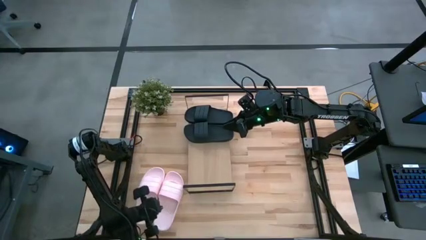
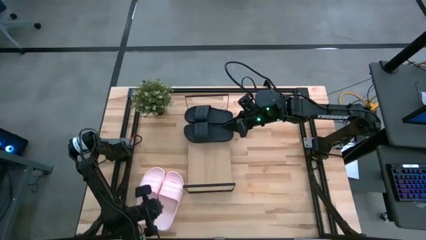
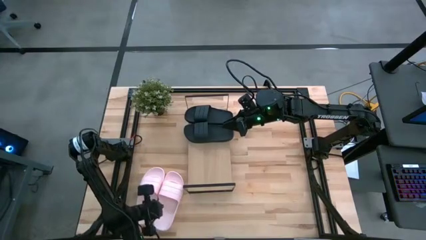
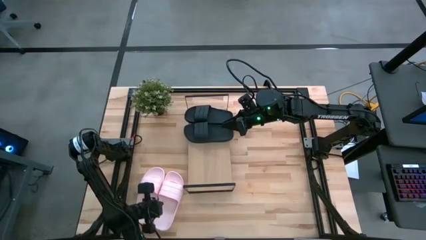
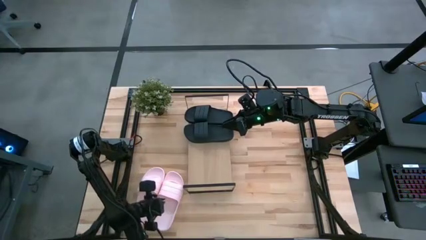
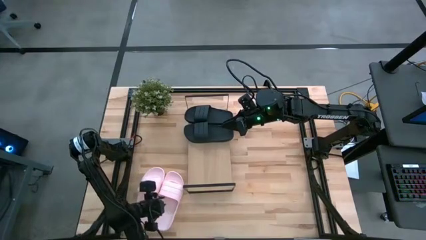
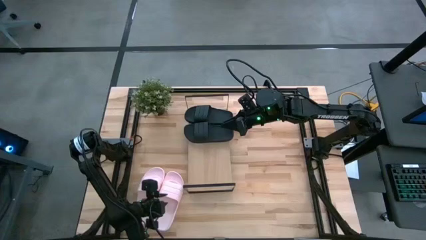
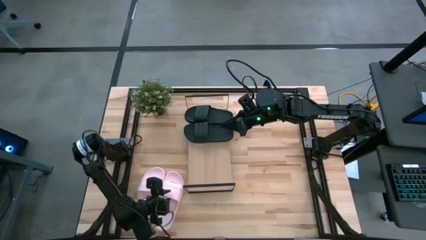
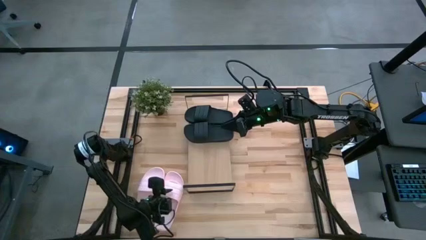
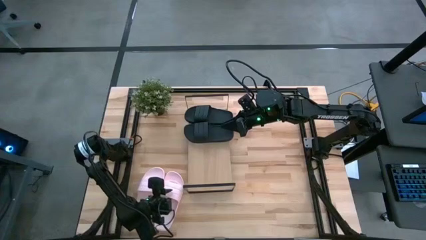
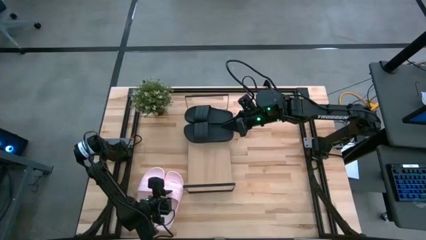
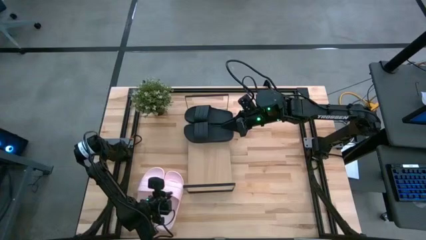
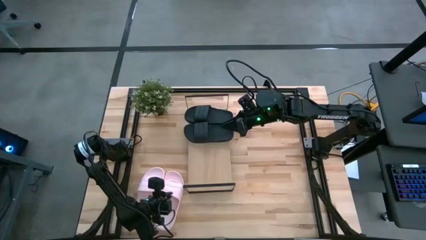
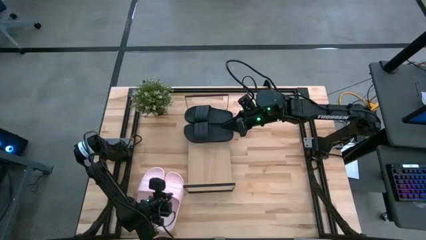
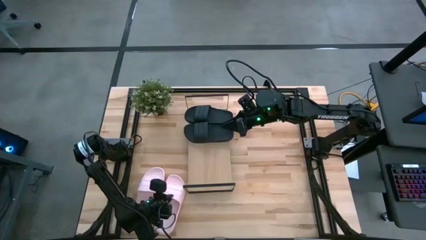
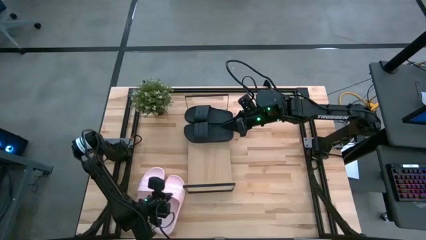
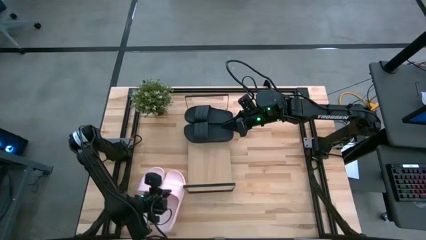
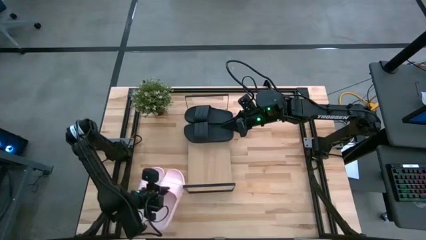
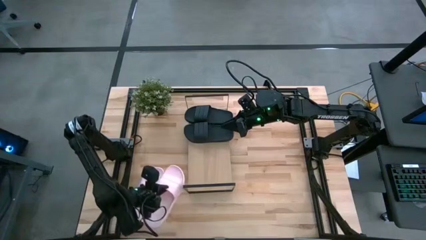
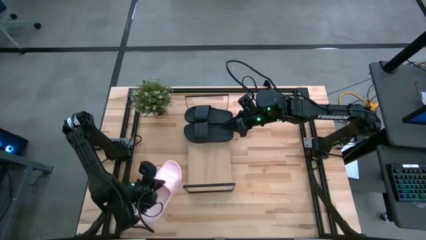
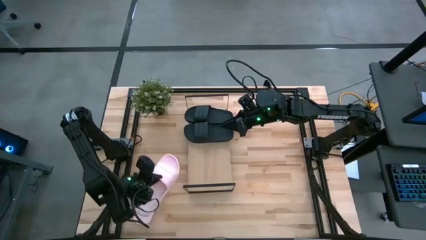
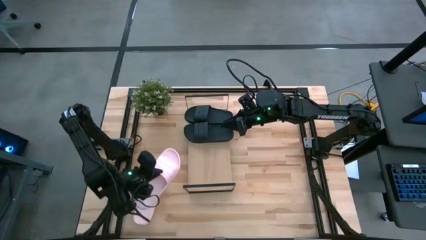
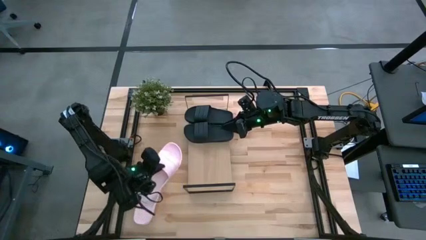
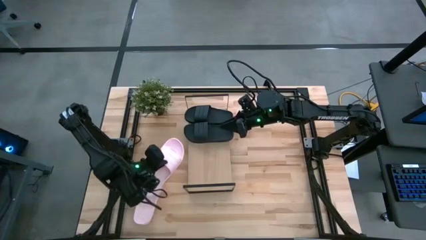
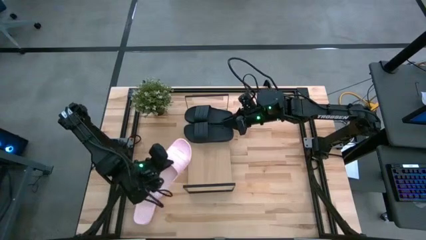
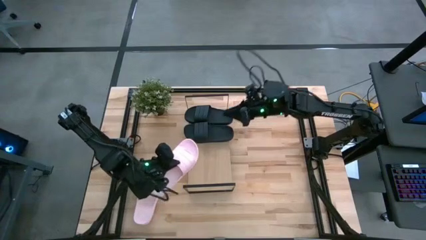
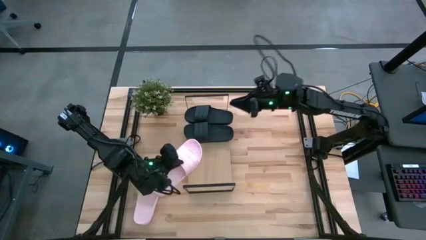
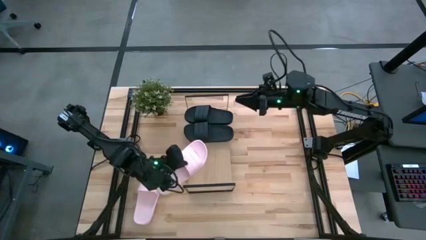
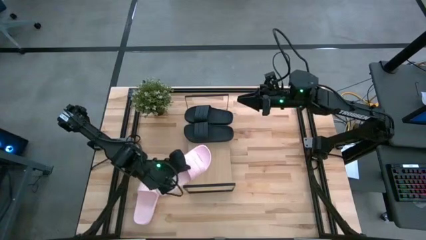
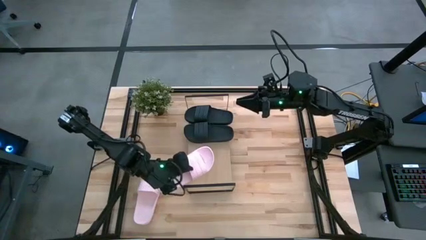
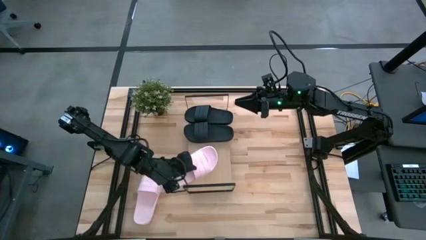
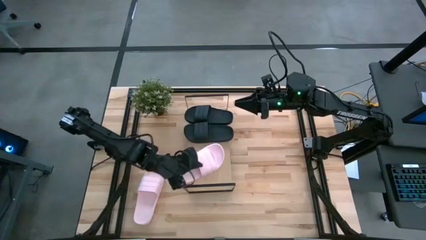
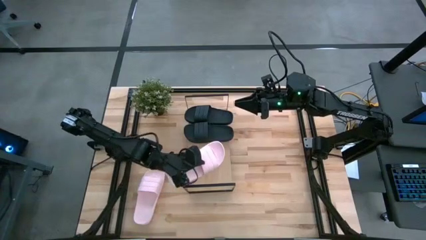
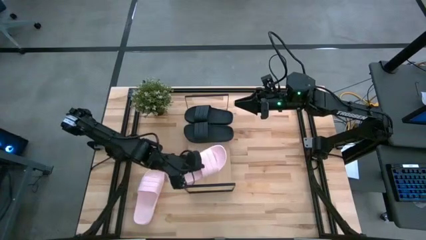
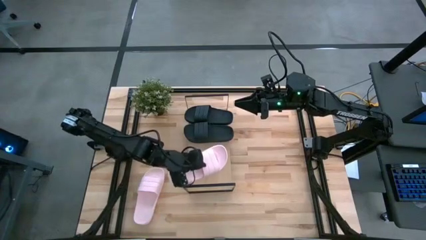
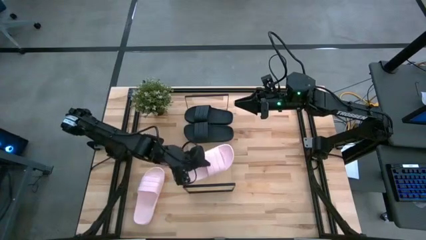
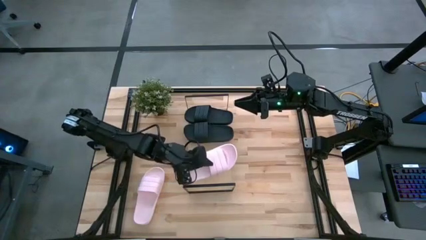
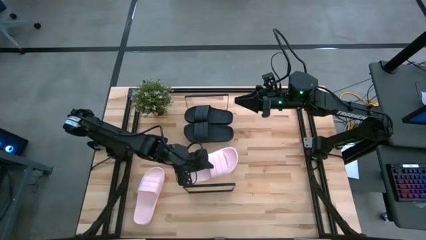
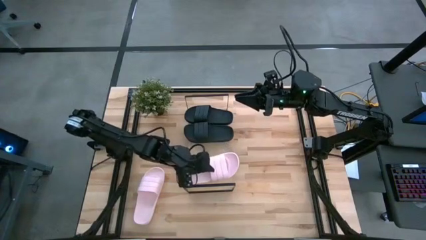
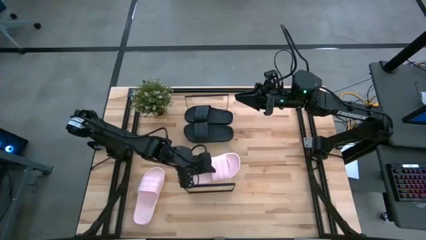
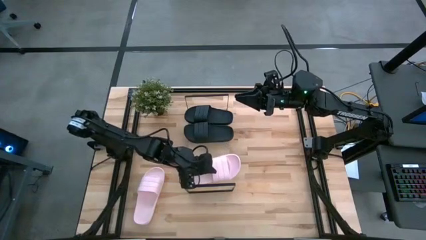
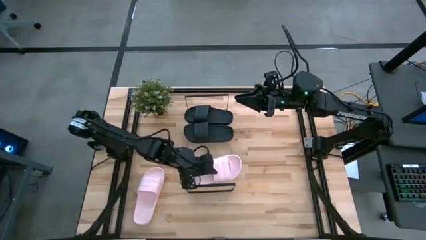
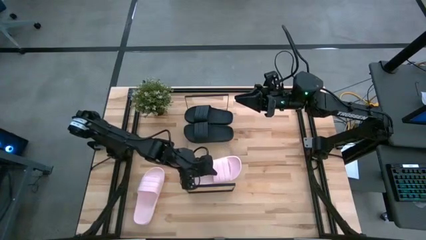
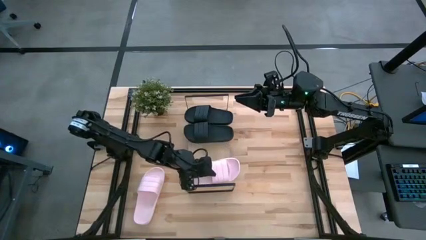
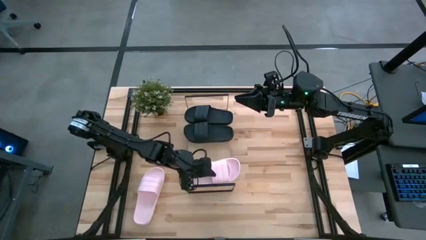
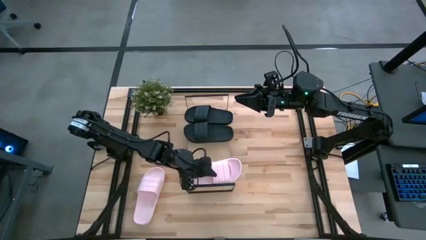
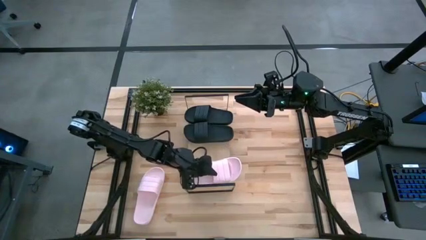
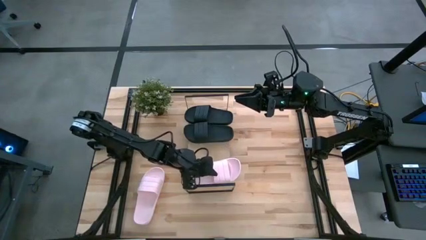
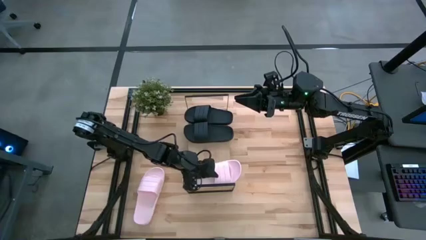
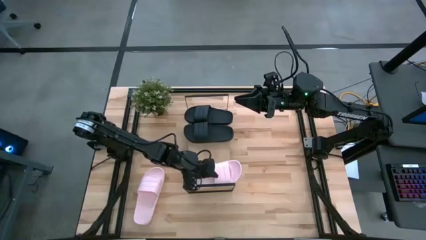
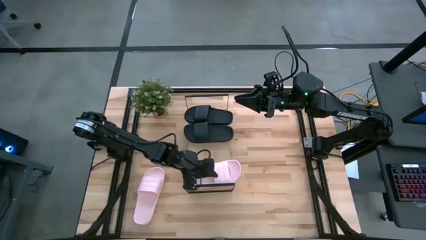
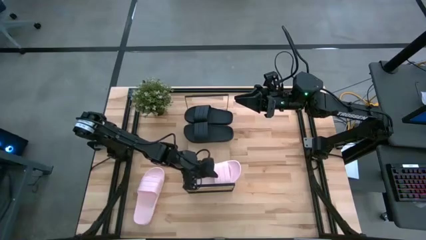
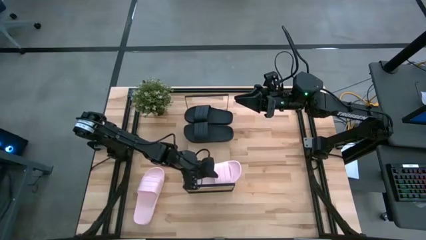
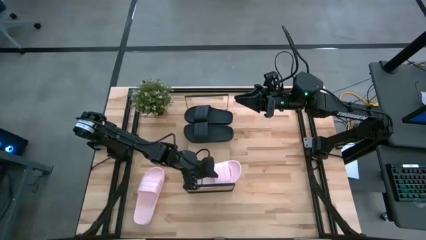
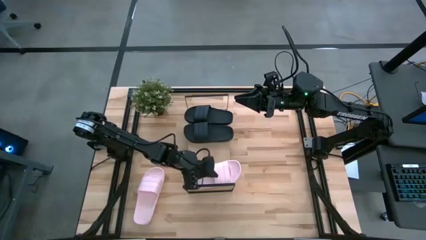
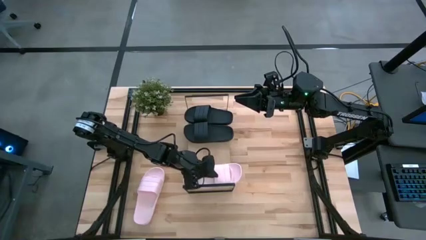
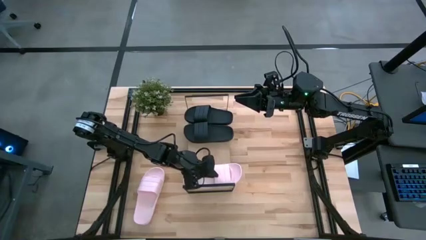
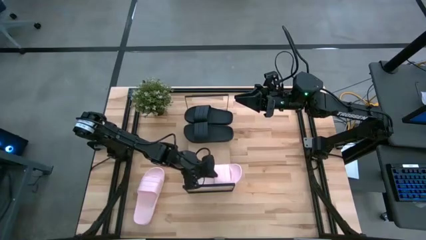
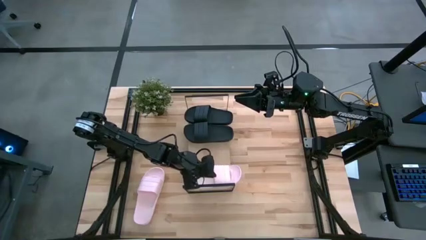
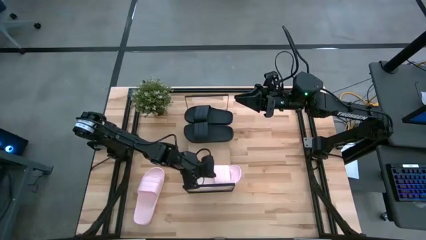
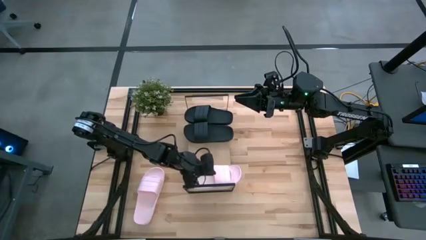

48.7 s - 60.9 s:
Task: Pick and place slides into the shelf
Put the right pink slide on the shelf
